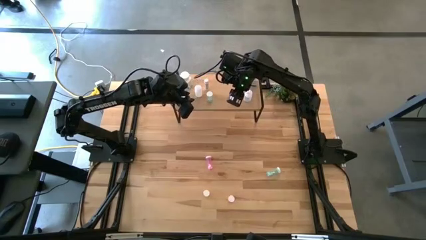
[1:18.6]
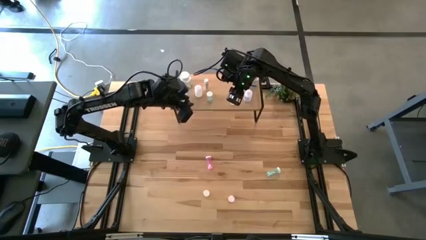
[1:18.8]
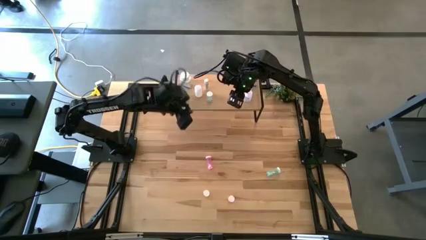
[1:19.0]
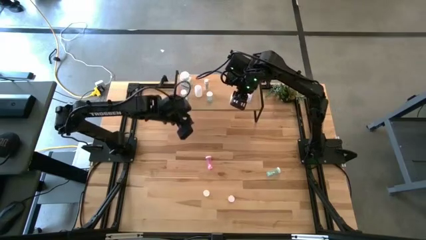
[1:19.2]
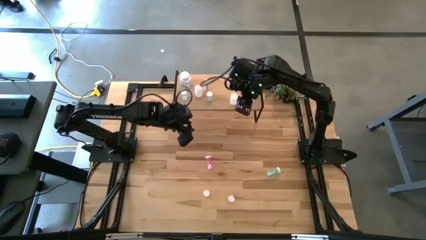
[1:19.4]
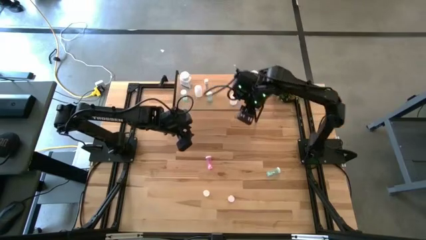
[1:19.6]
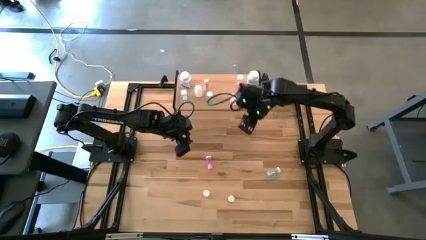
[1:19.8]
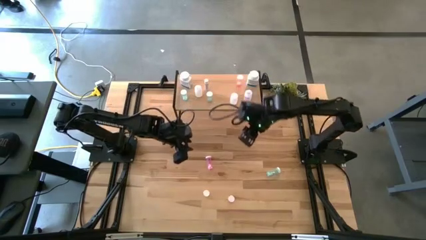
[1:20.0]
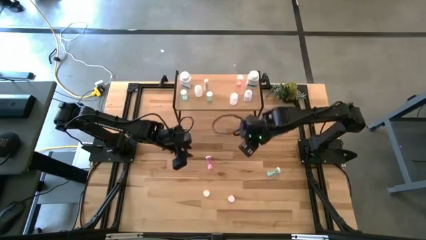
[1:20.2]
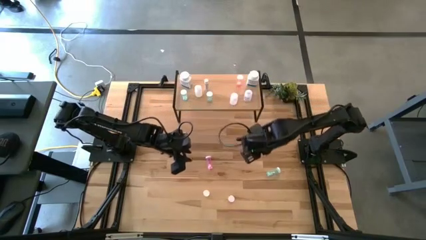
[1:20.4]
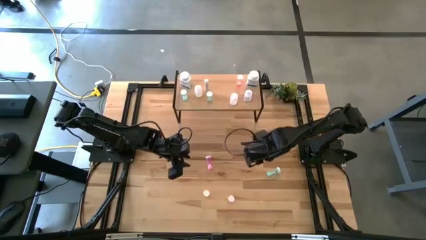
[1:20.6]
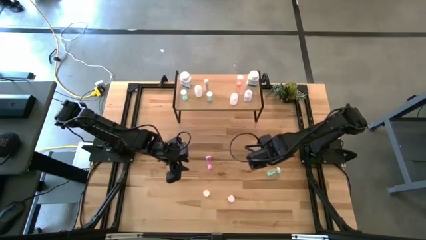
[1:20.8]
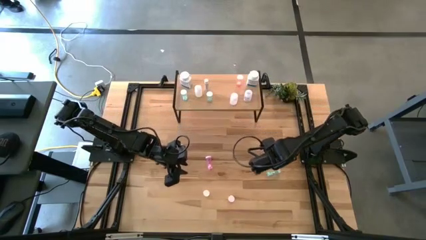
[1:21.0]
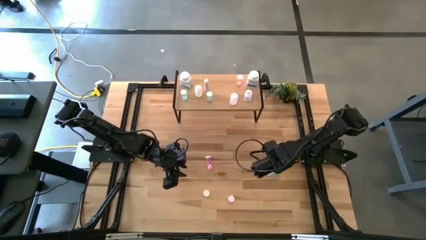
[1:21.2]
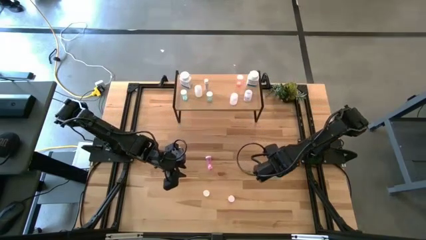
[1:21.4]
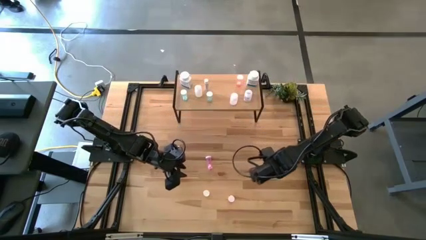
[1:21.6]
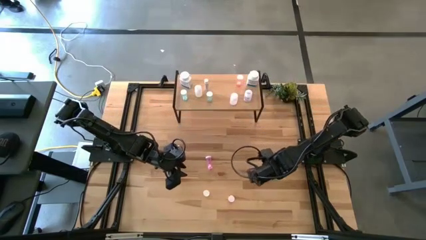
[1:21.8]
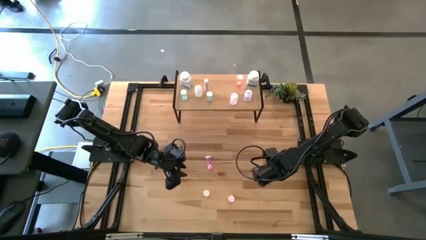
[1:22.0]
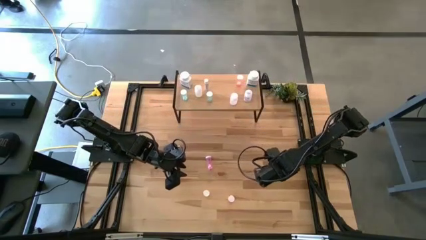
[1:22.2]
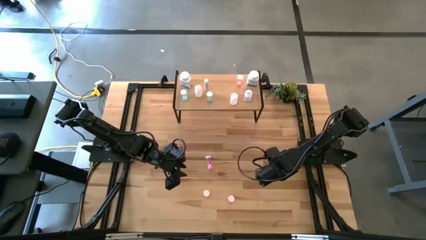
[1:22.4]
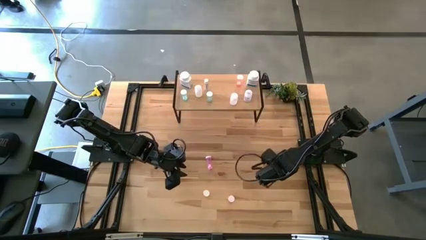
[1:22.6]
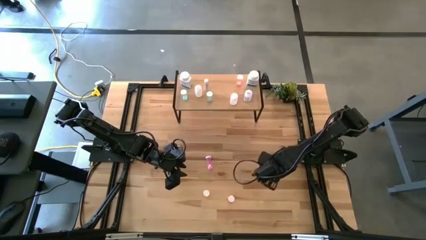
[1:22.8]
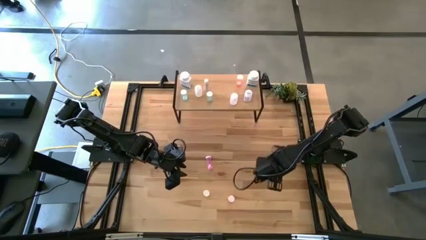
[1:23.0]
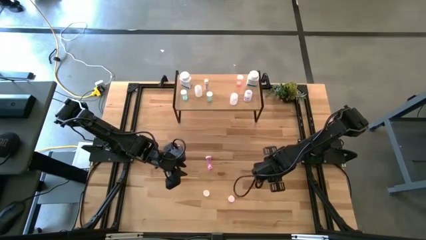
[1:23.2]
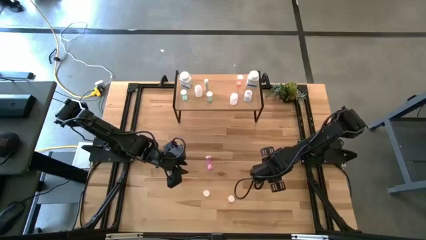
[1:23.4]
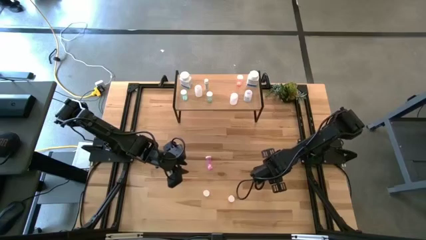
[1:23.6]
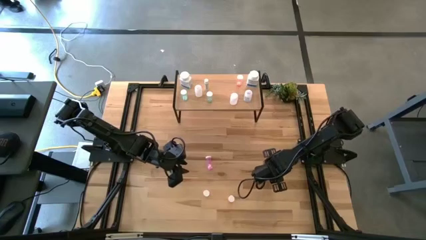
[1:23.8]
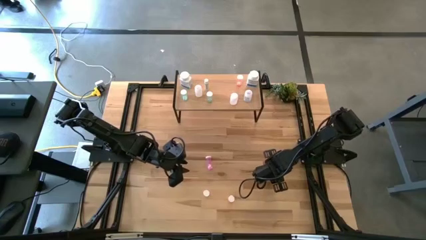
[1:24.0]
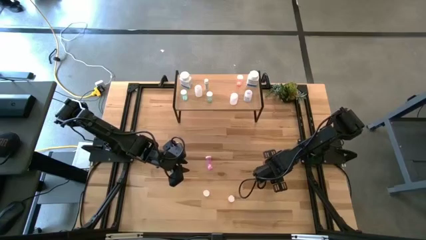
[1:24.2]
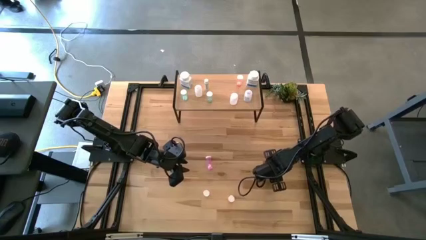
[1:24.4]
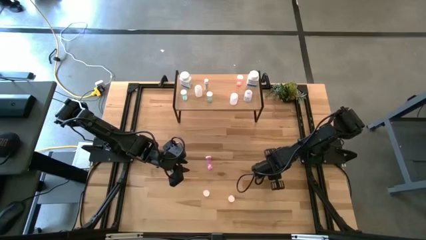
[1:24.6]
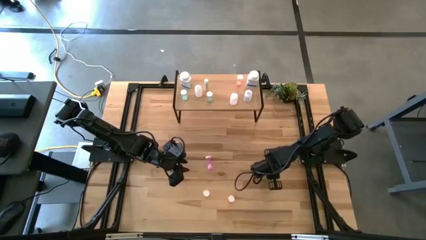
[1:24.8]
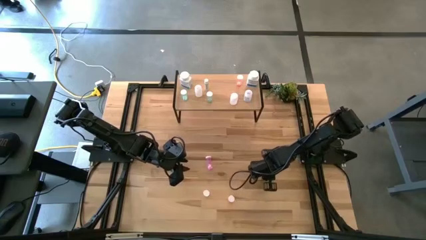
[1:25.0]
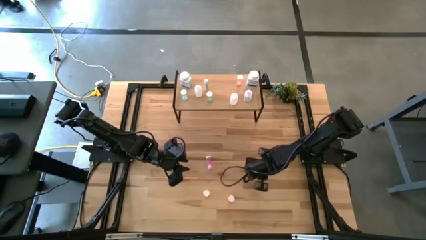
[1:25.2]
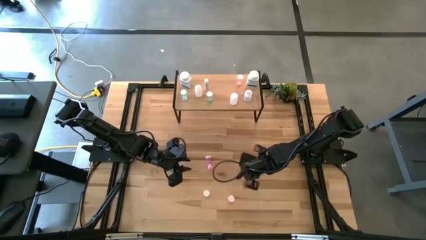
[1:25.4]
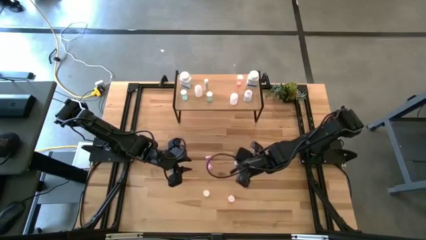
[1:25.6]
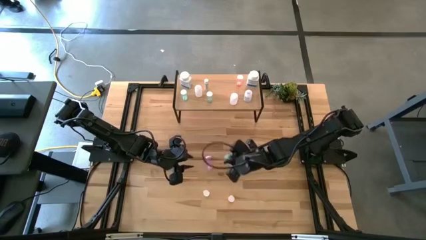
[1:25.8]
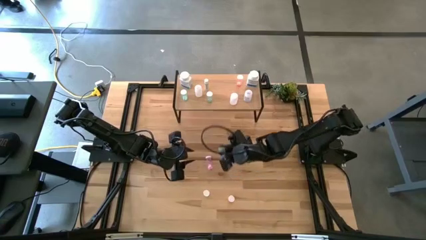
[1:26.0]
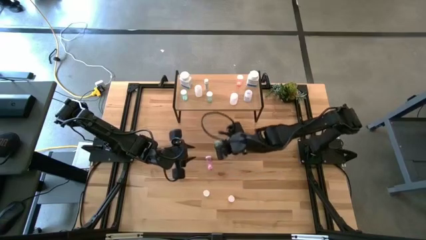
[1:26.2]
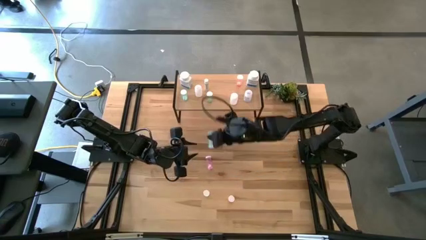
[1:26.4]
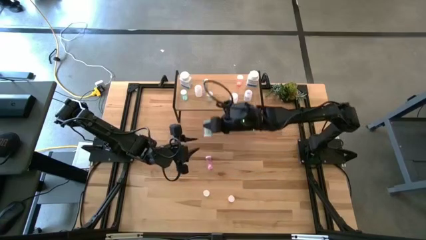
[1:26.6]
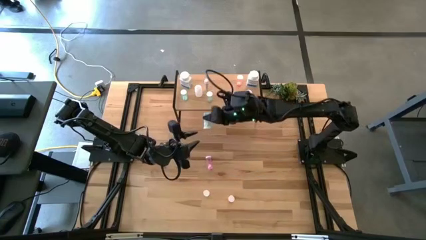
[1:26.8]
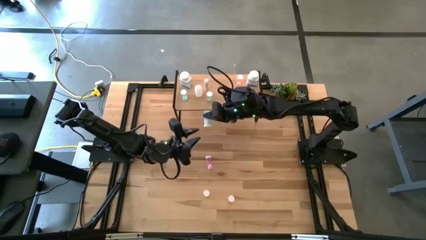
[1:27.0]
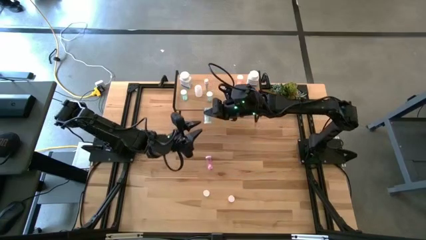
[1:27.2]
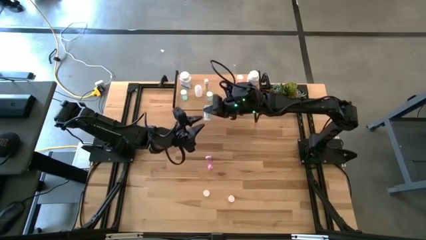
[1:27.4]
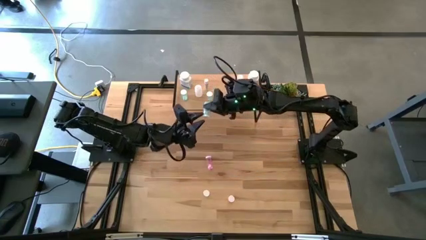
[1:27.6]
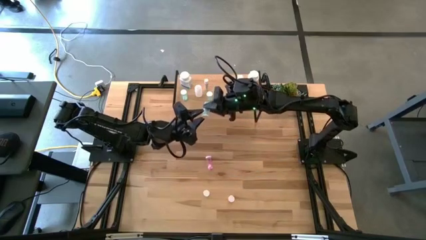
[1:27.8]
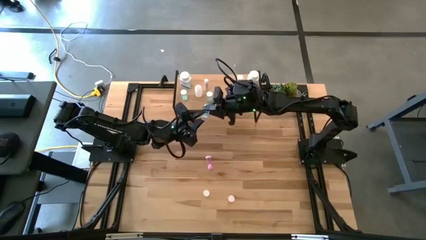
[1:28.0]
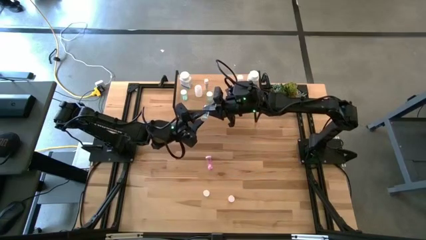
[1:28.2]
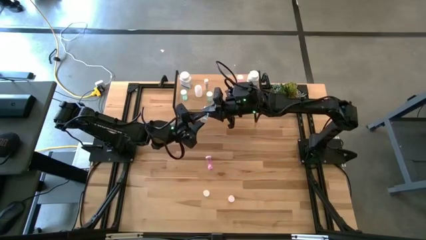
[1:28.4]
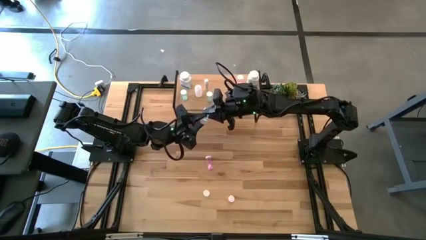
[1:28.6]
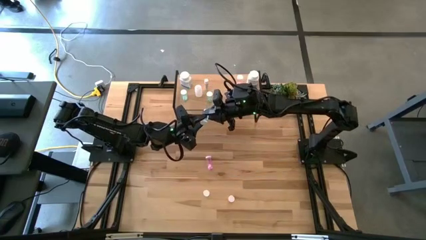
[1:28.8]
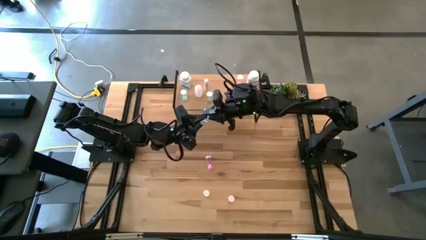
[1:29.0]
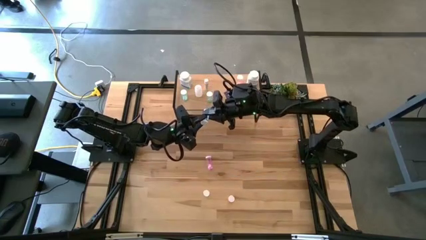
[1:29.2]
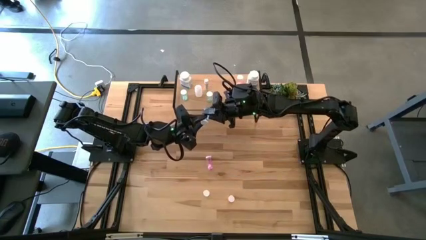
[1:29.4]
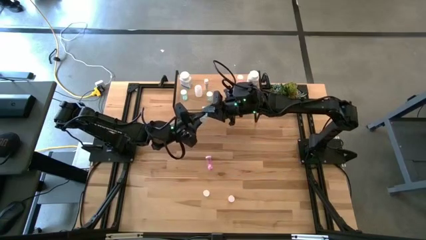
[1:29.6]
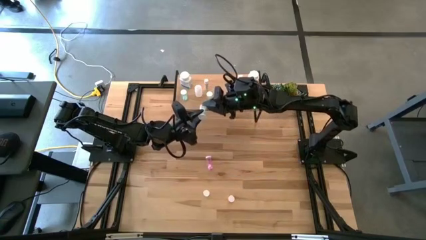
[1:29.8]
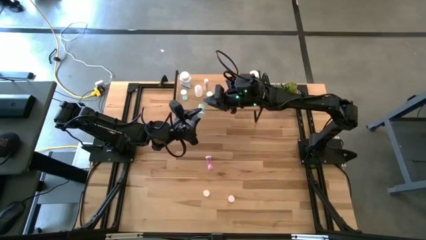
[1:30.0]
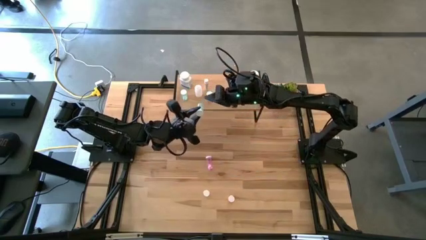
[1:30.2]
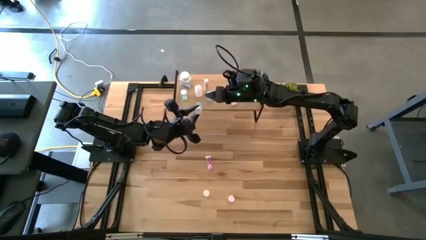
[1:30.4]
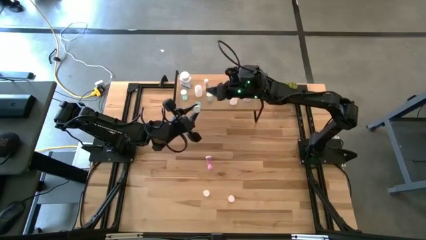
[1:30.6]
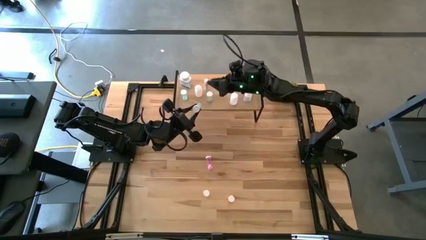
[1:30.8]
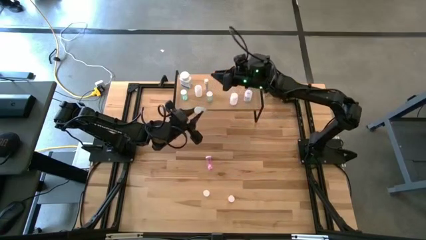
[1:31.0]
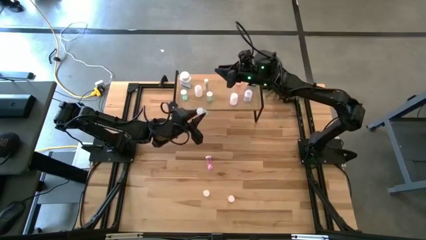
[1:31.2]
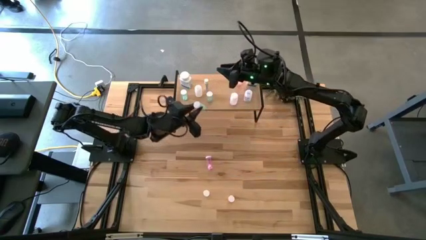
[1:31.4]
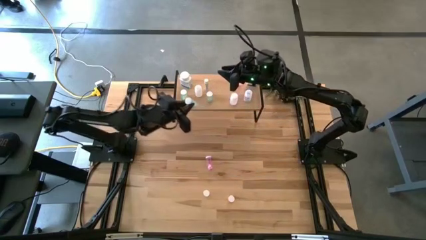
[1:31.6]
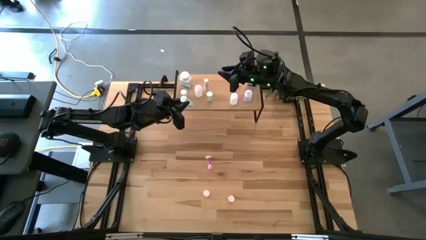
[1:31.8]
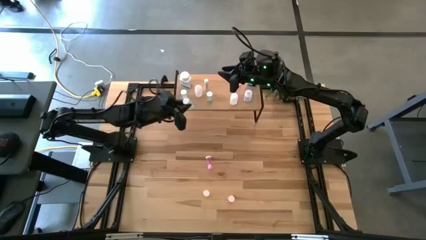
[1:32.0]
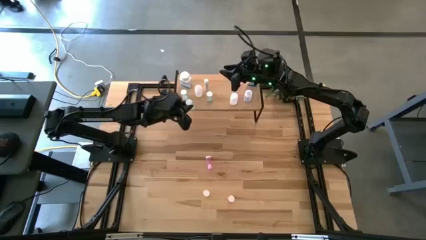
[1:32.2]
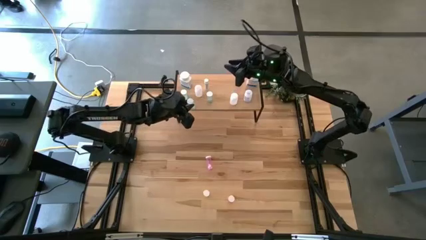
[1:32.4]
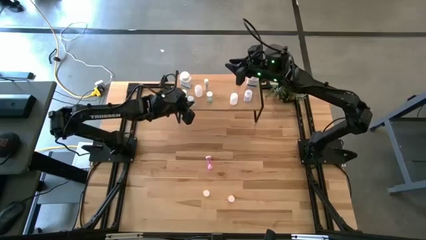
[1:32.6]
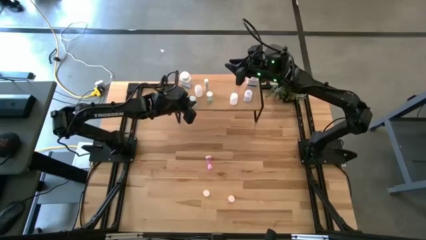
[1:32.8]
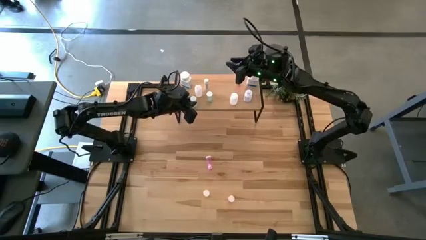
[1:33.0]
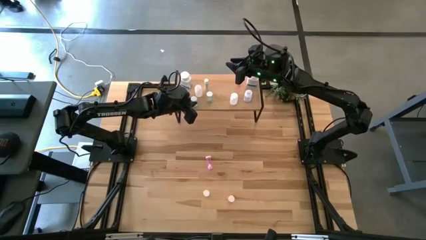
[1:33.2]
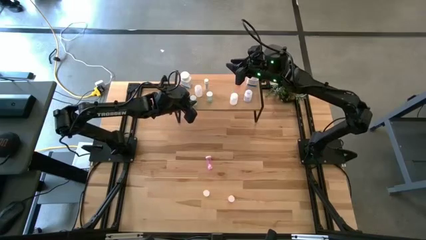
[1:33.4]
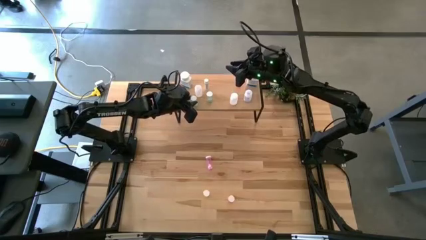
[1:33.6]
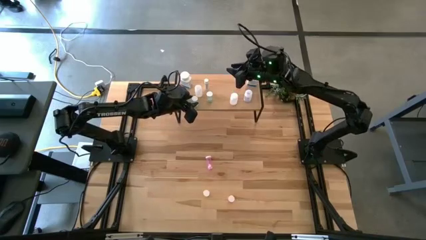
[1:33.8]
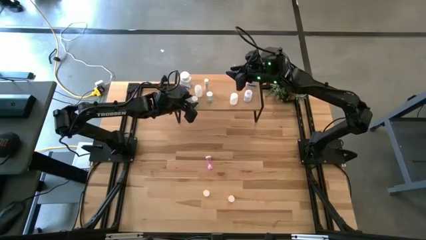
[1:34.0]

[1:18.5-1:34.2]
Task: Pick and place medicine bottles onto shelf by color
Put the light blue medicine bottle on the shelf
